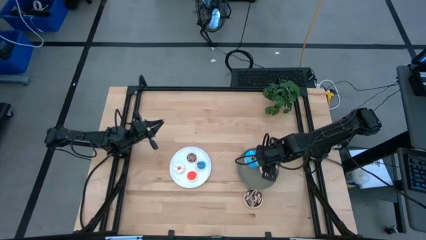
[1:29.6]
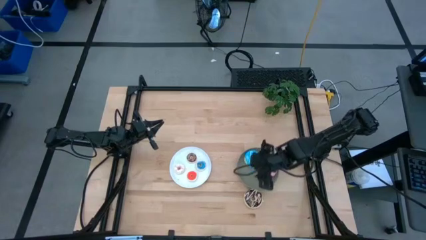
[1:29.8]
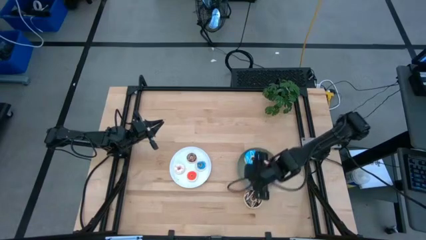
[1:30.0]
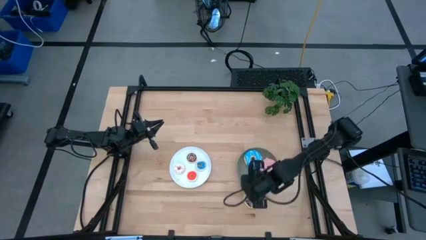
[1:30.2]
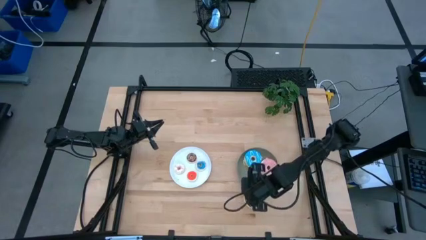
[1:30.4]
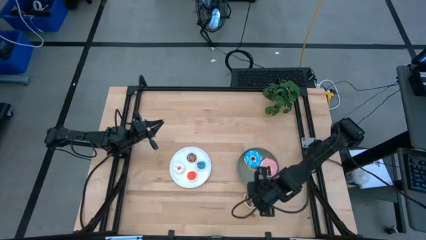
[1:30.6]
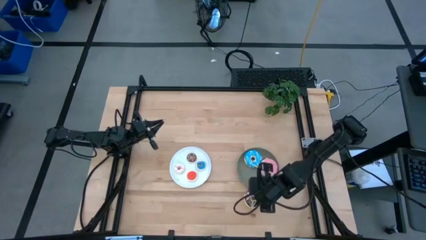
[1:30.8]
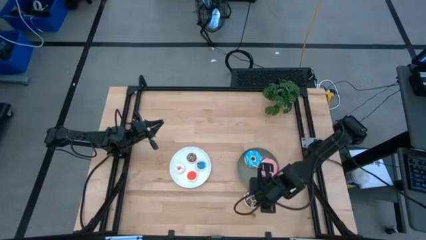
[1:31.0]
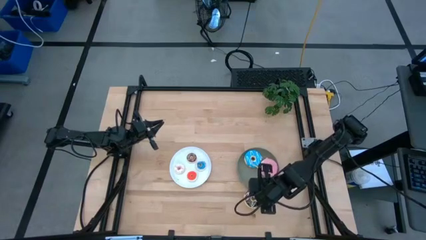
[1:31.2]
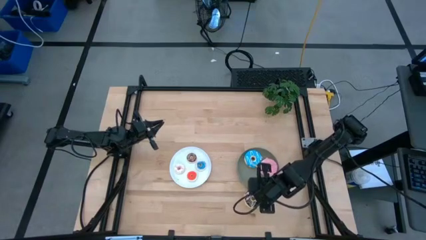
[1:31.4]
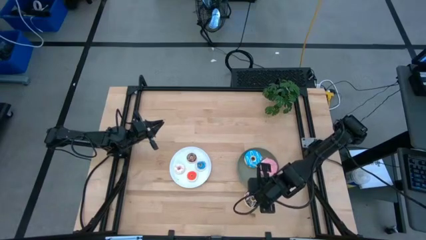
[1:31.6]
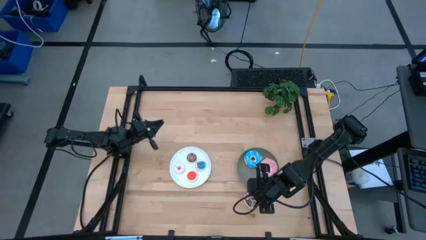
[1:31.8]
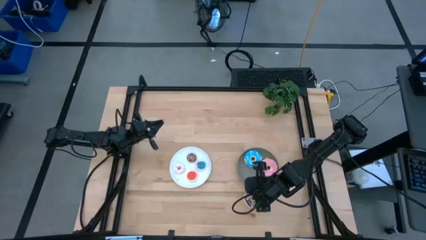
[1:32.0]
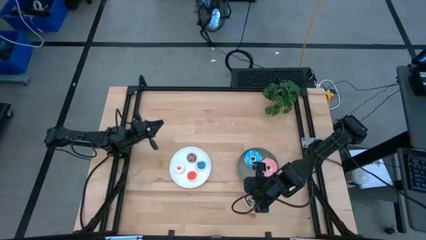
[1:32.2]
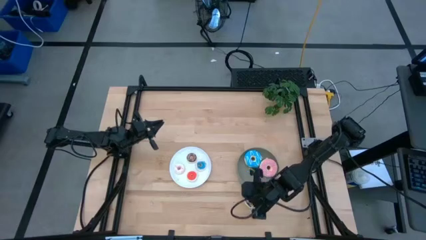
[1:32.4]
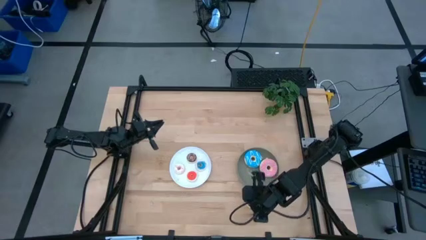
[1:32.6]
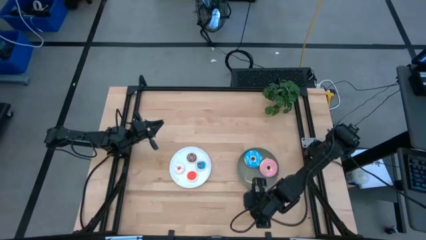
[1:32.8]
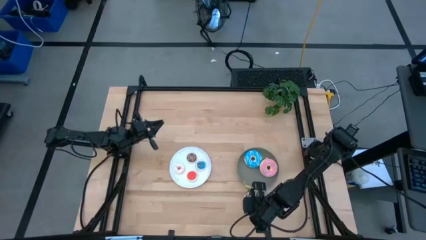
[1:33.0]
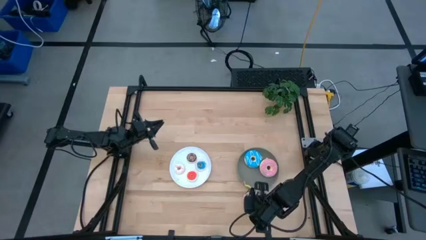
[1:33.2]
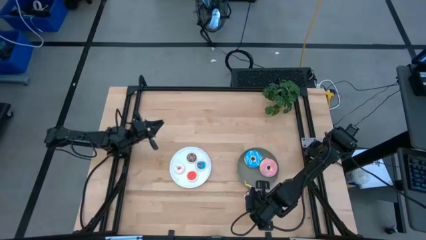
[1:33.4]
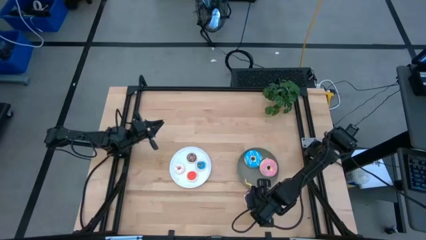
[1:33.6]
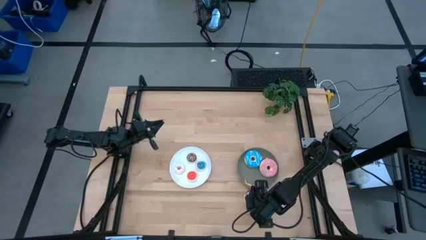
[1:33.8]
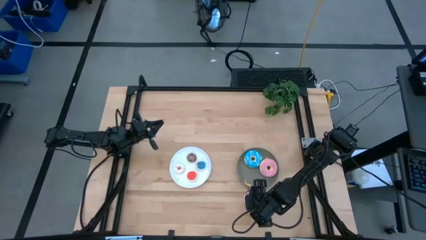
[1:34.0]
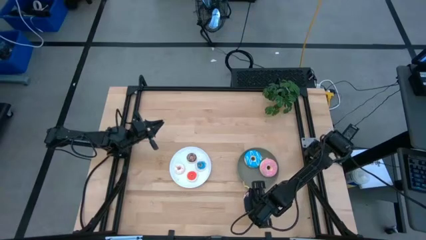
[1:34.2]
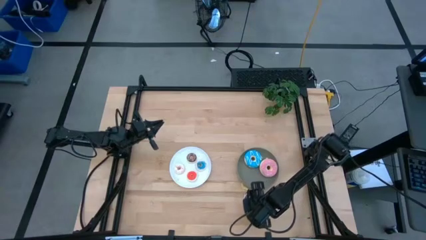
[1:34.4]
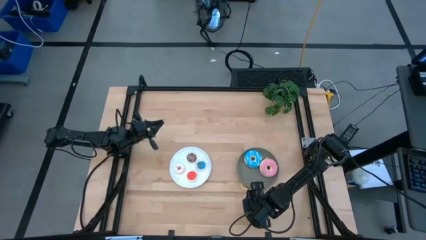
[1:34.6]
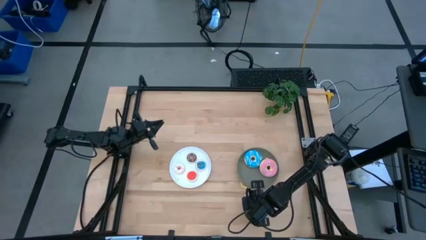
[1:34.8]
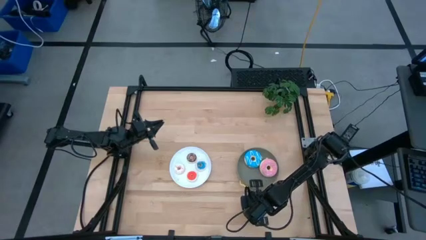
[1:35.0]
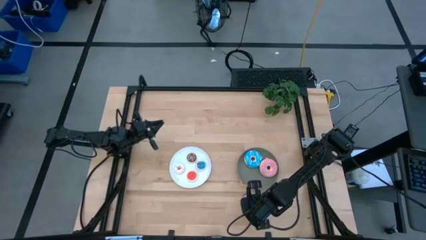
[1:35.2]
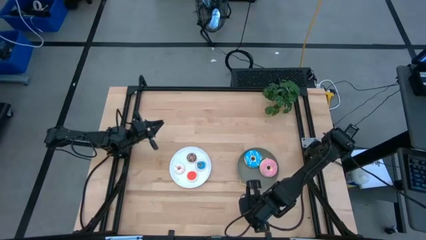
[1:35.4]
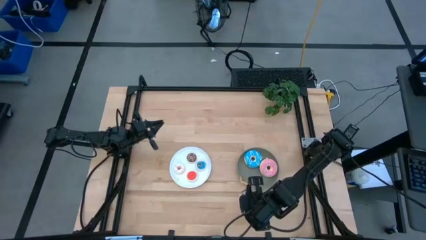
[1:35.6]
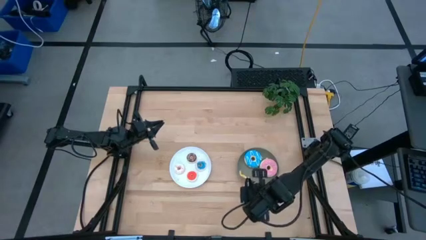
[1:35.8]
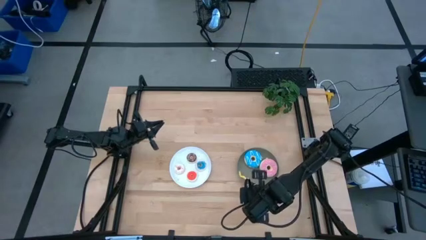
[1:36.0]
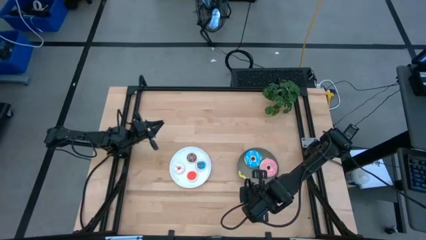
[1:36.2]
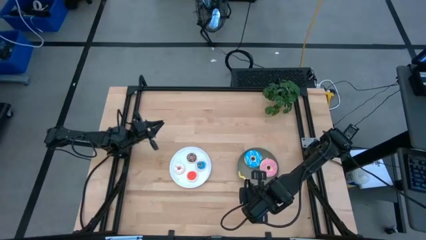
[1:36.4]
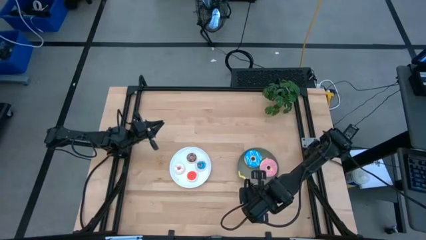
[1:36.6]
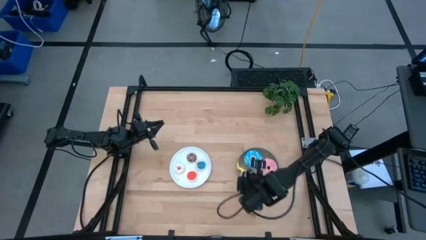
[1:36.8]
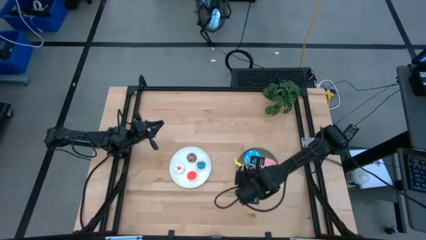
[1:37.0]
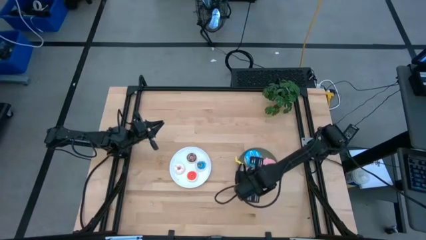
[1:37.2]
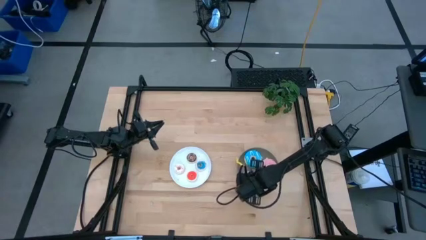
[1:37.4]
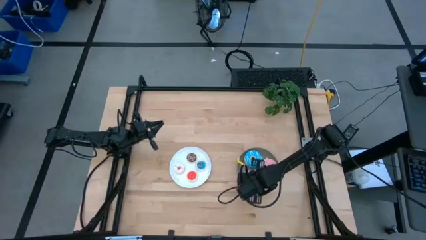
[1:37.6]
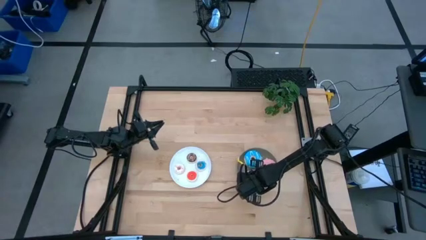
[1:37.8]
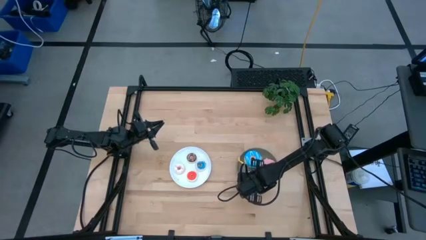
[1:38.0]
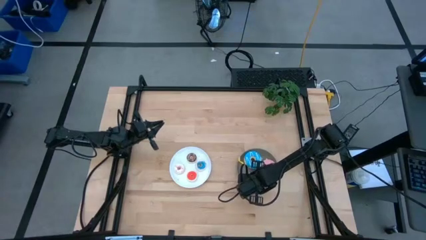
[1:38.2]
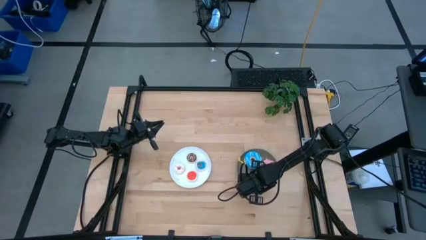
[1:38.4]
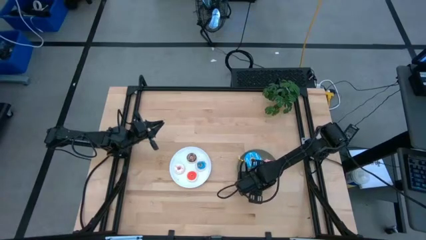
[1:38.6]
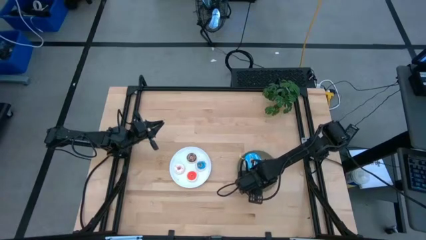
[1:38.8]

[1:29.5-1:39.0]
Task: Pick & Place donuts
Put the large black donut on the gray plate

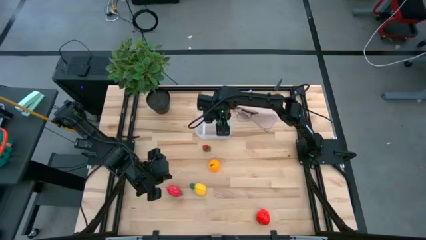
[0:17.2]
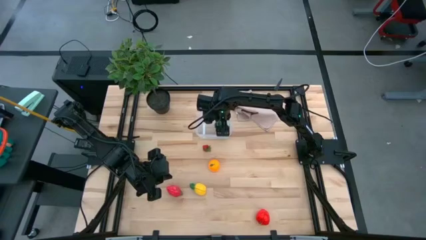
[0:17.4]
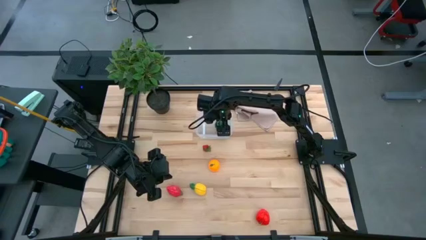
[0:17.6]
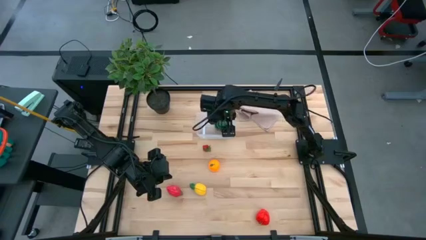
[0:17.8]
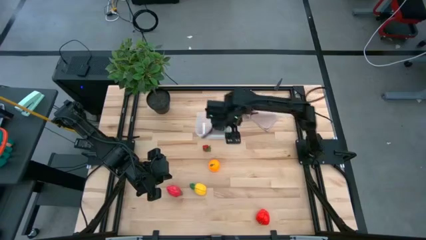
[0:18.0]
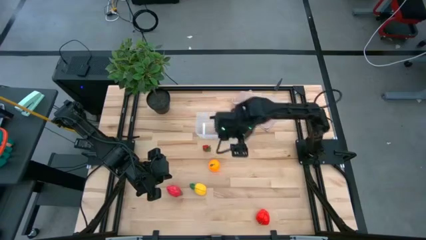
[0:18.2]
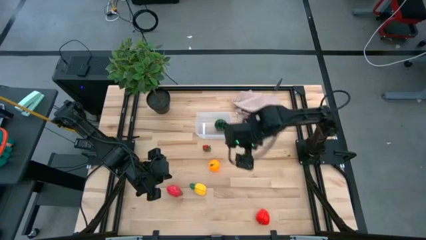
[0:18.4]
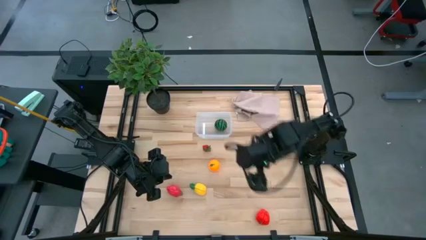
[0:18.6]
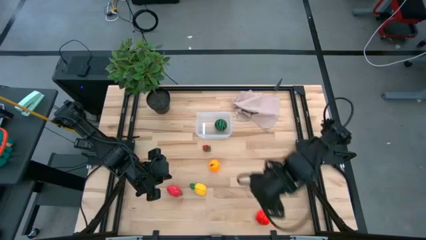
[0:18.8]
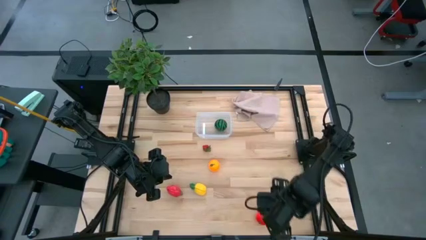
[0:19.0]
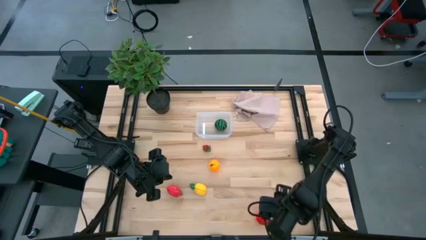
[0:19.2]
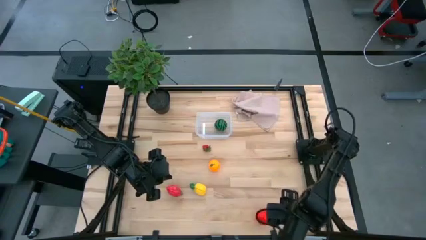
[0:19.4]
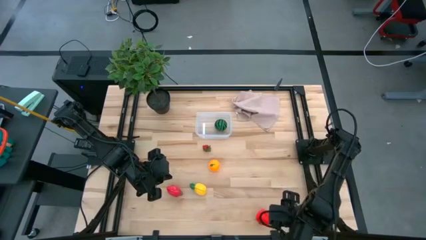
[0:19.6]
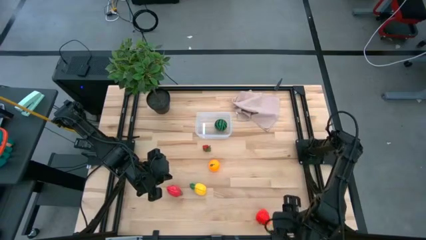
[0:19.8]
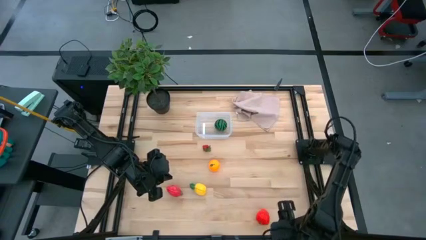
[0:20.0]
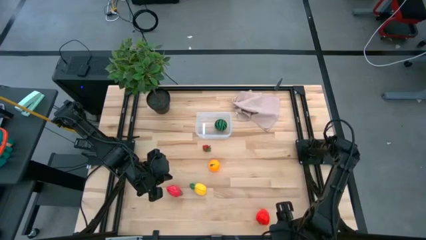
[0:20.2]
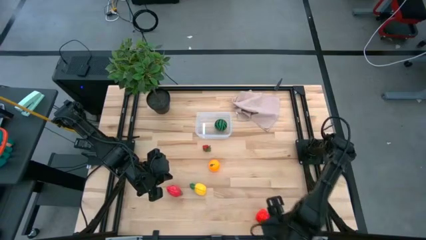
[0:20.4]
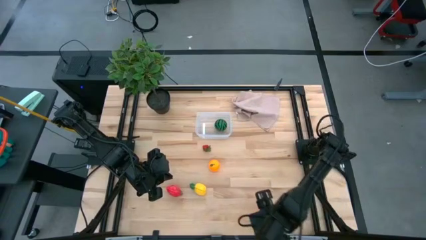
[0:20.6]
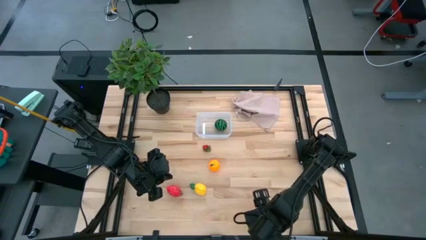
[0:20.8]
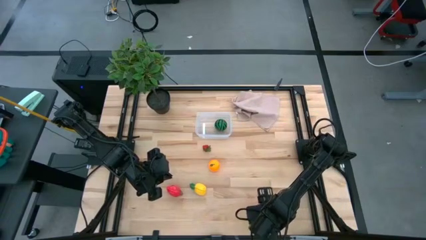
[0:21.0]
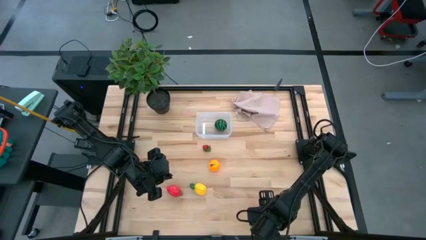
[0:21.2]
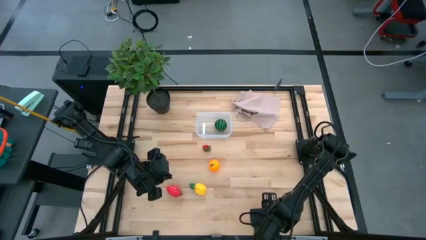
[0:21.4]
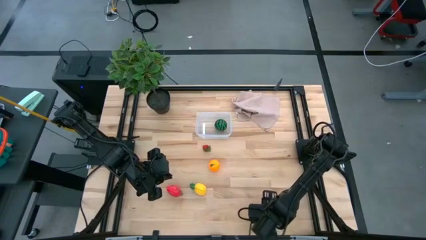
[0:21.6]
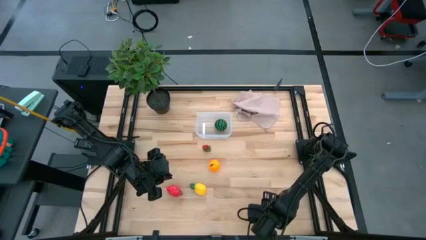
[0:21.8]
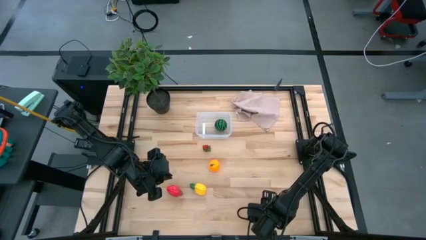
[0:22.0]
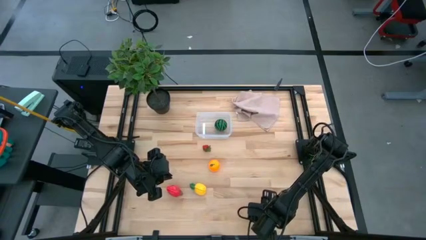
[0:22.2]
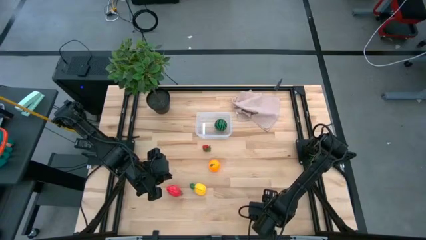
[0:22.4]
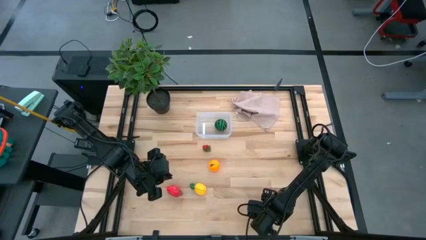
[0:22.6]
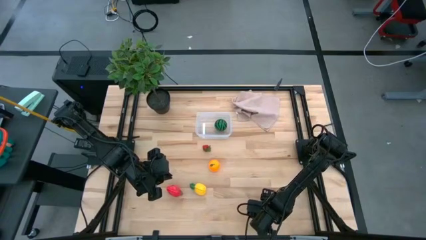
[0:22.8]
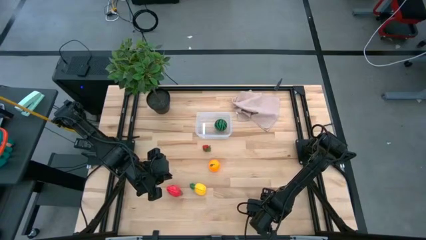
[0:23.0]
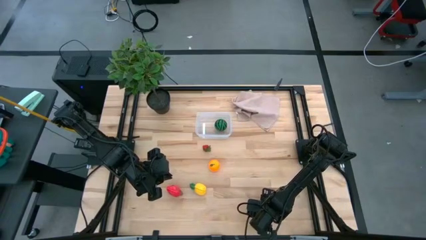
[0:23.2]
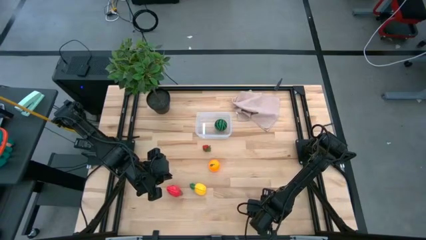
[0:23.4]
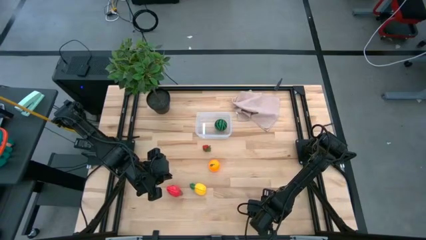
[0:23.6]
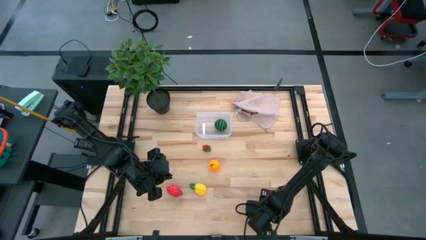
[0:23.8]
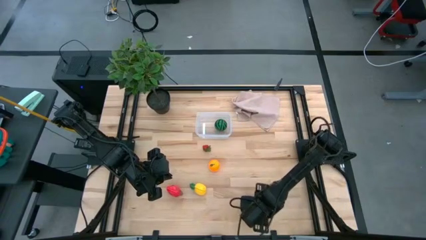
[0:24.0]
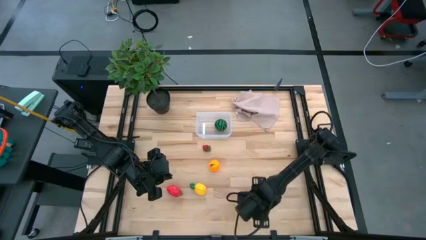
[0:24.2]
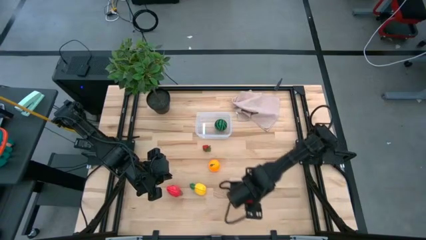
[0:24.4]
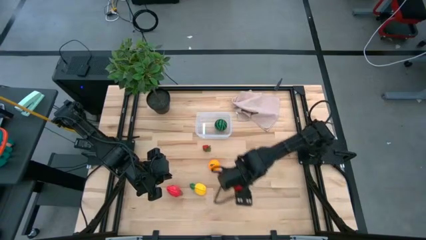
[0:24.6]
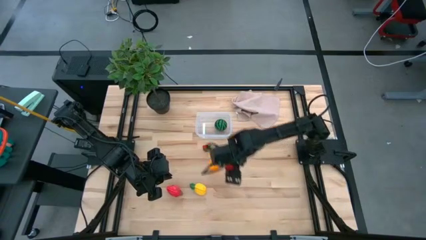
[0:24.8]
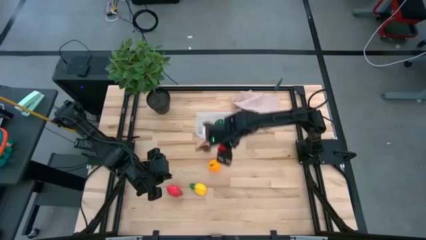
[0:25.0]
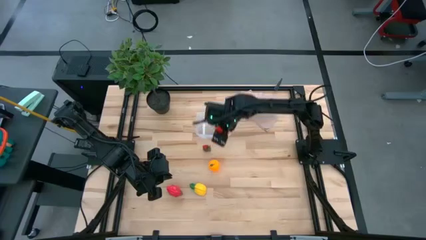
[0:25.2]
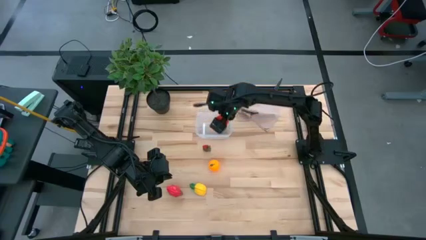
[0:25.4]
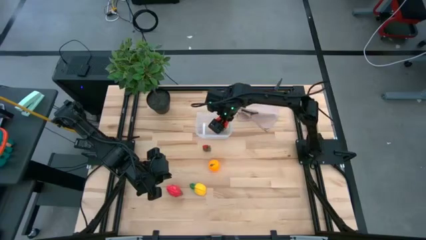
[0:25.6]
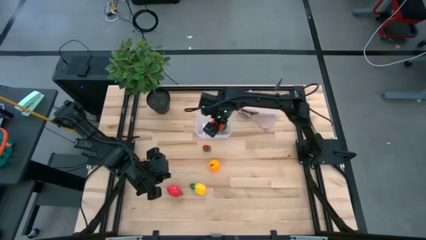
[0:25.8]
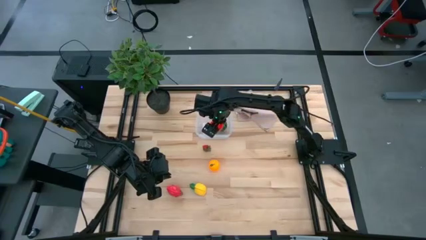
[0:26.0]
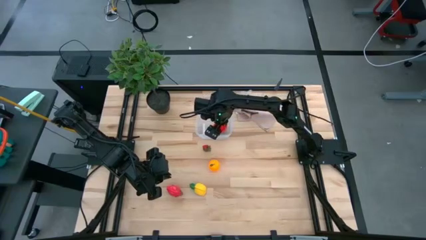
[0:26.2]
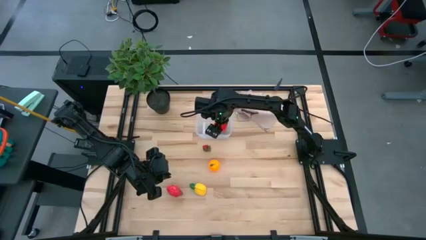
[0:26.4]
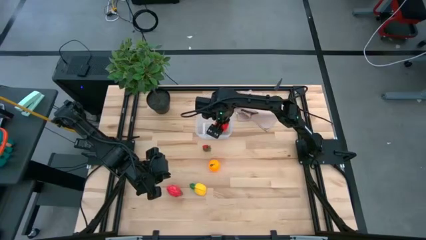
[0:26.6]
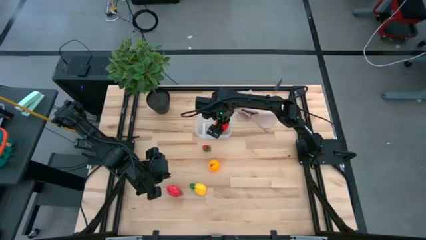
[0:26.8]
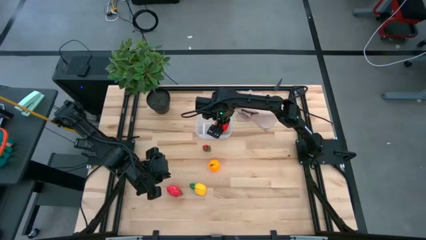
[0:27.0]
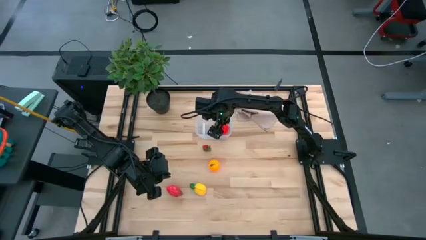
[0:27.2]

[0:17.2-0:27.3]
Task: Pick and placing Produce into tupperware
Put the red apple into the transparent container
